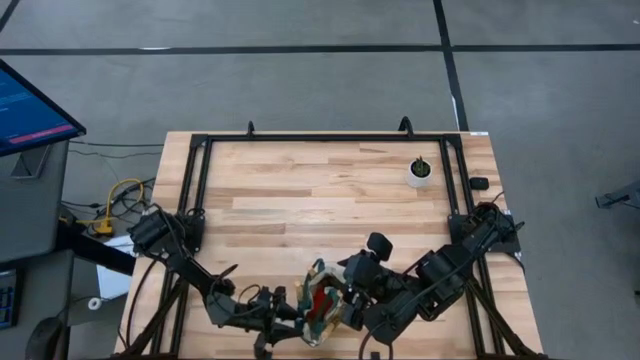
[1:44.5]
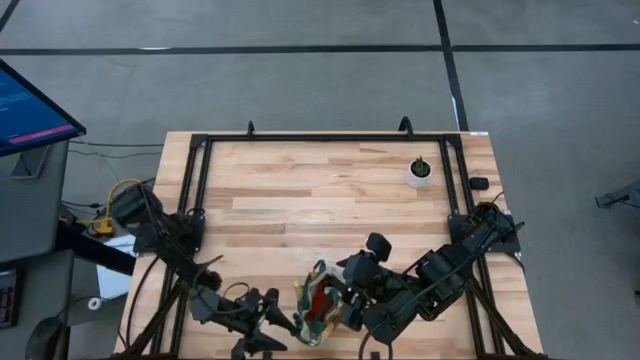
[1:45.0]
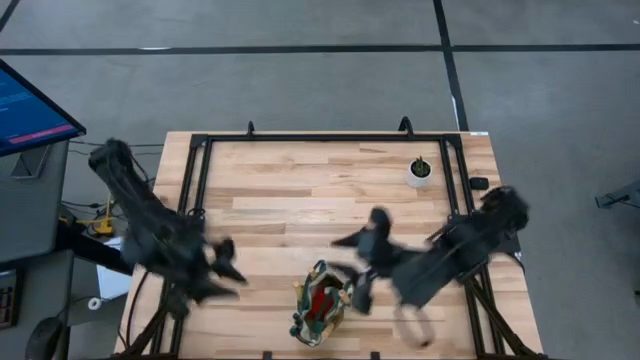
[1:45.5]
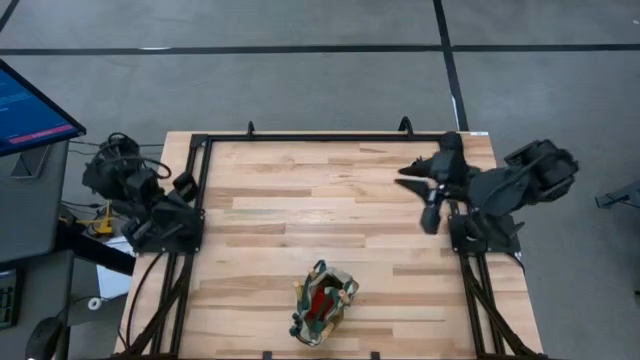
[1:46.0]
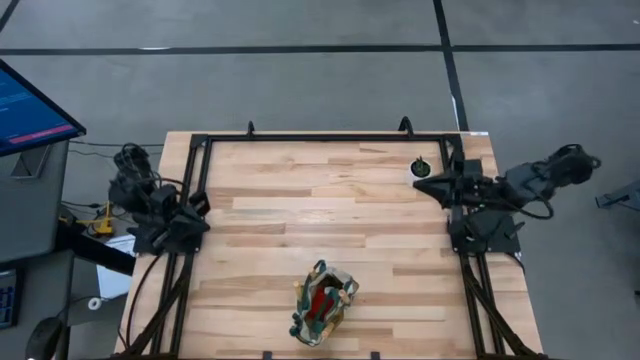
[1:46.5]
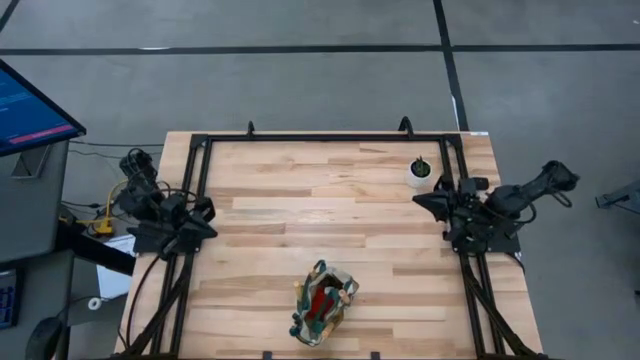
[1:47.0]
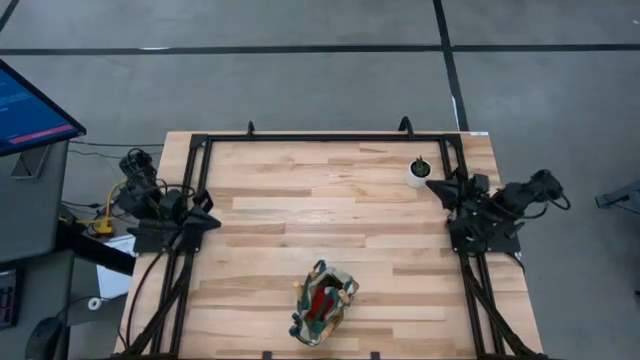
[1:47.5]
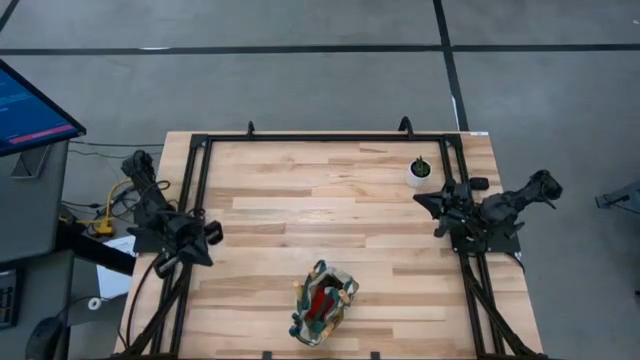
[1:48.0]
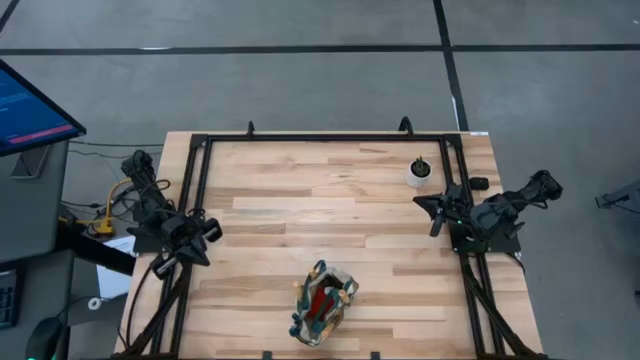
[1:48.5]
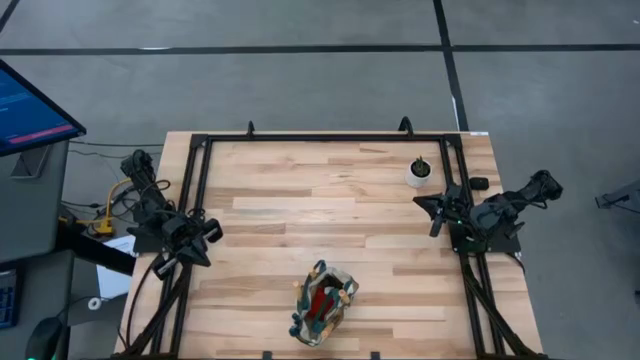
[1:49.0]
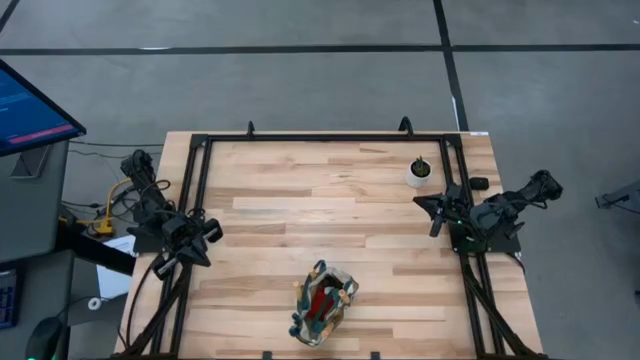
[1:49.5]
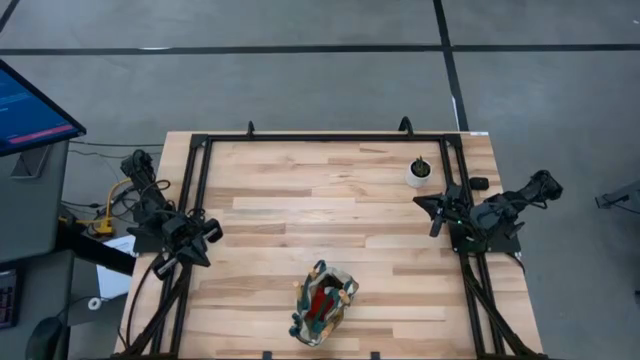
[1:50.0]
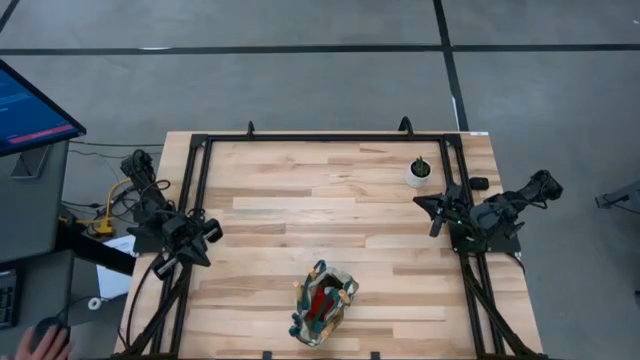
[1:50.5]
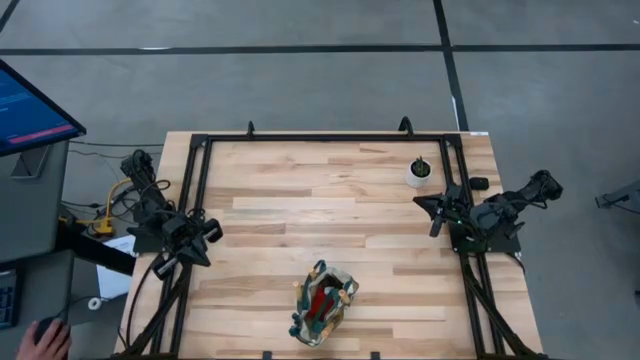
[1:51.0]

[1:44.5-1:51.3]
Task: Pick & Place Garden tools in Gardening bag
Return to Home Position

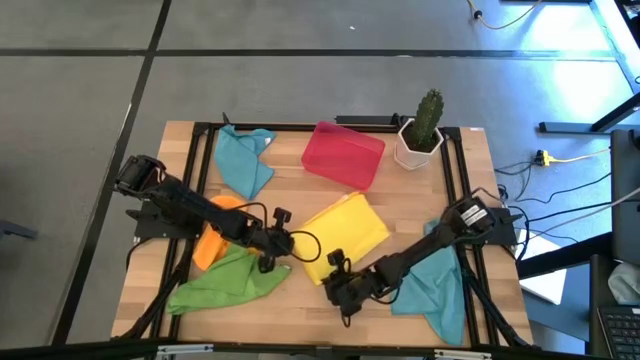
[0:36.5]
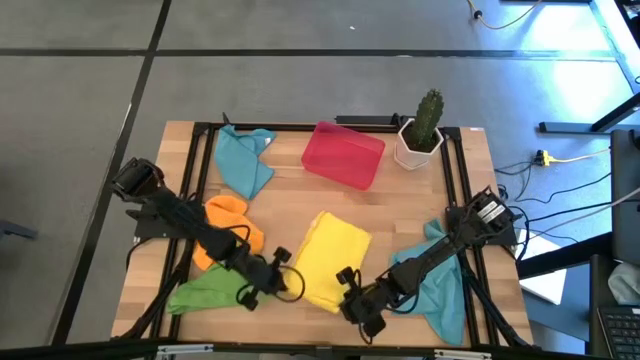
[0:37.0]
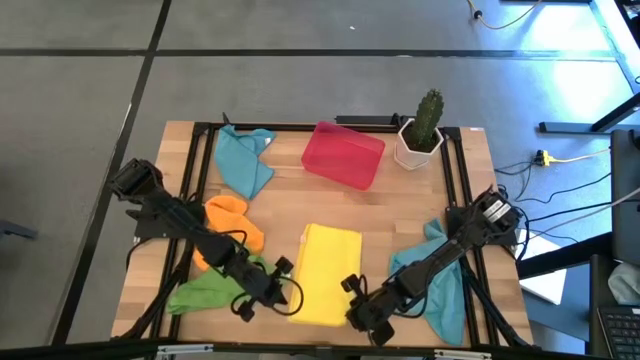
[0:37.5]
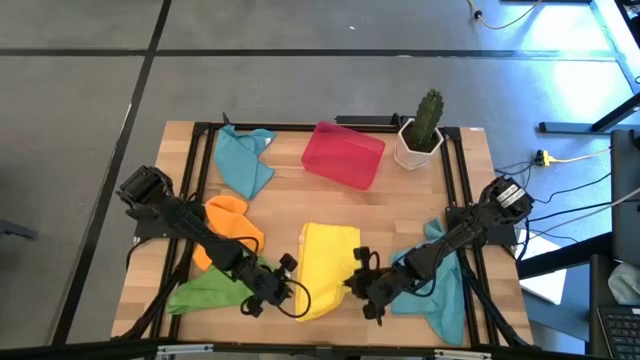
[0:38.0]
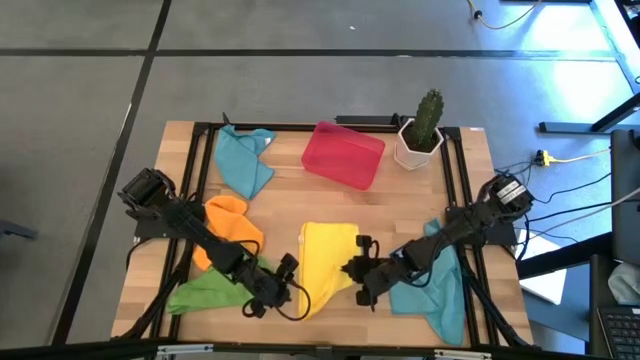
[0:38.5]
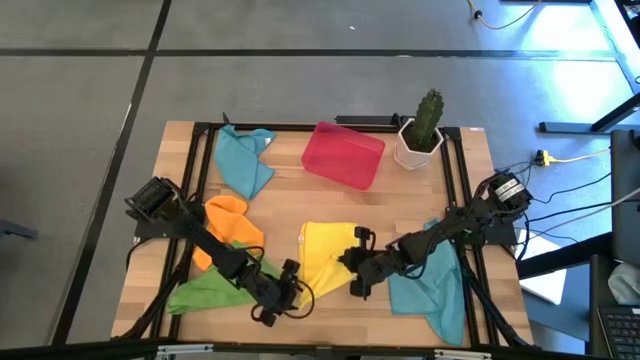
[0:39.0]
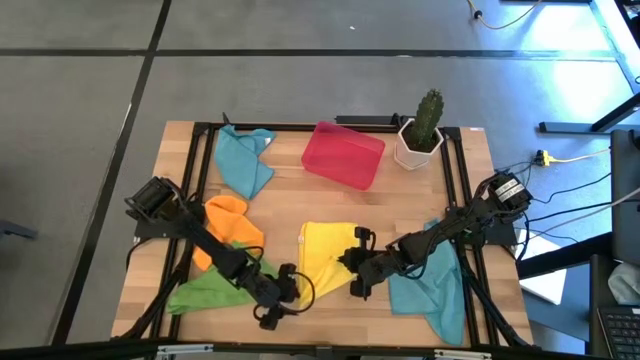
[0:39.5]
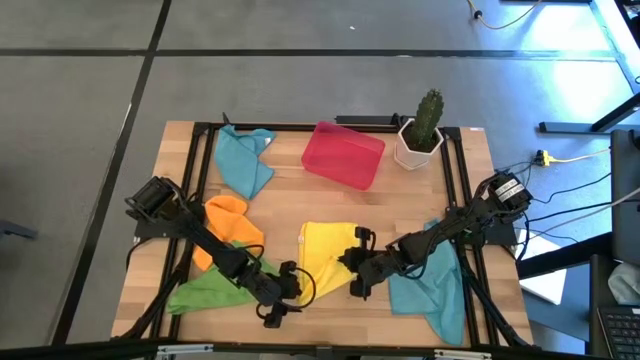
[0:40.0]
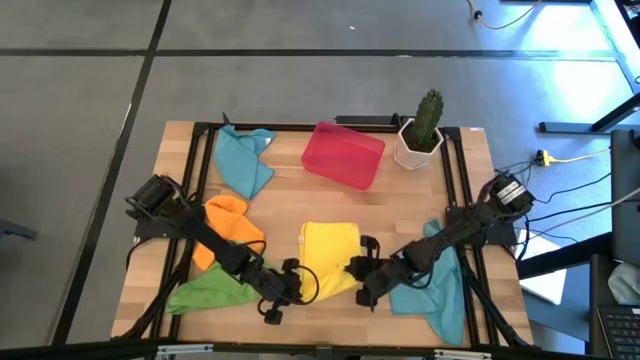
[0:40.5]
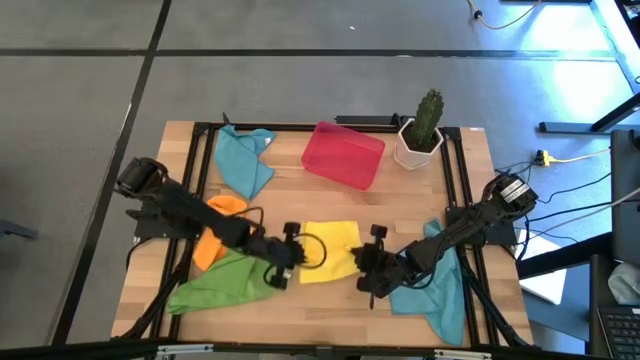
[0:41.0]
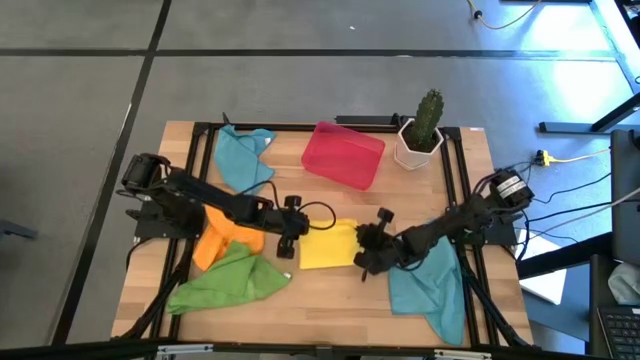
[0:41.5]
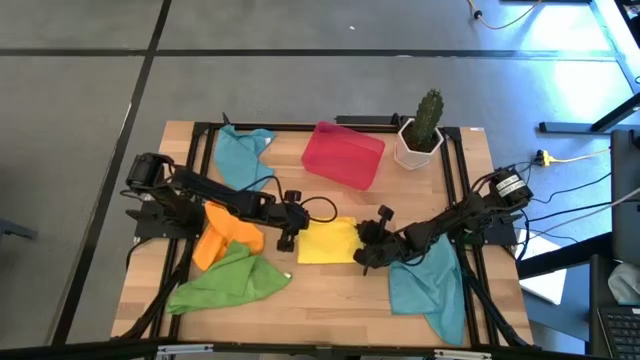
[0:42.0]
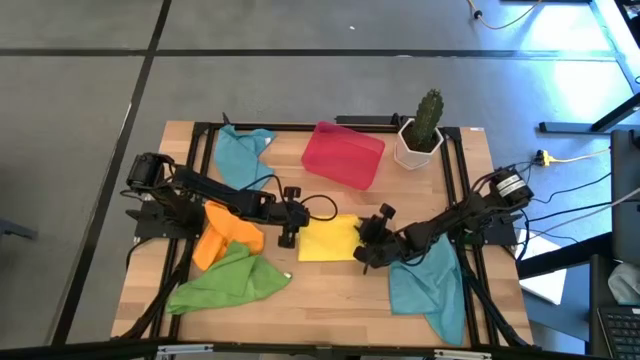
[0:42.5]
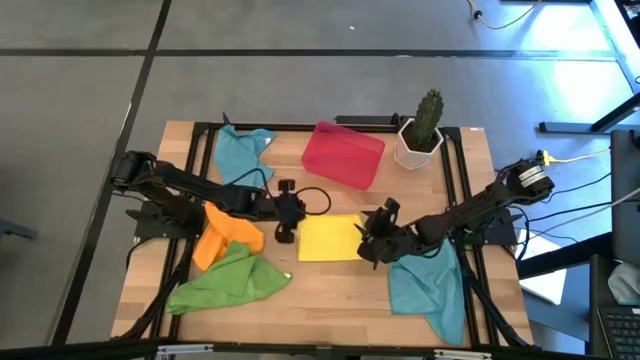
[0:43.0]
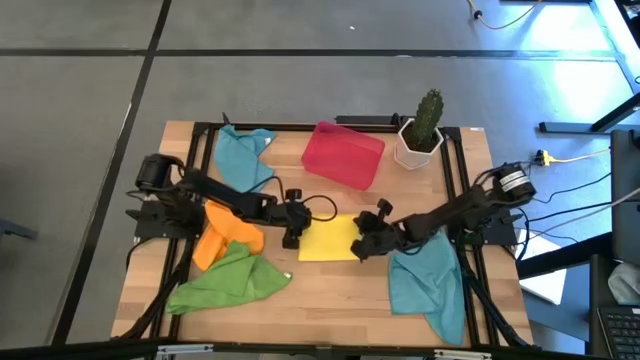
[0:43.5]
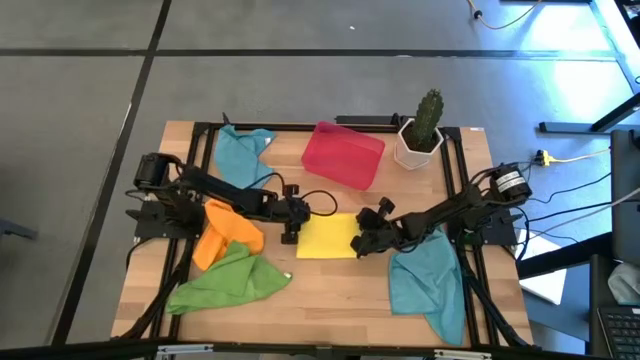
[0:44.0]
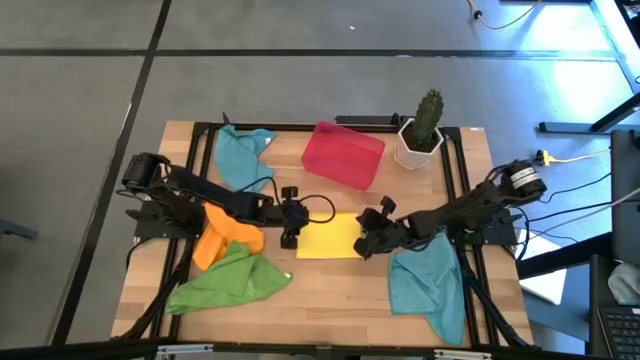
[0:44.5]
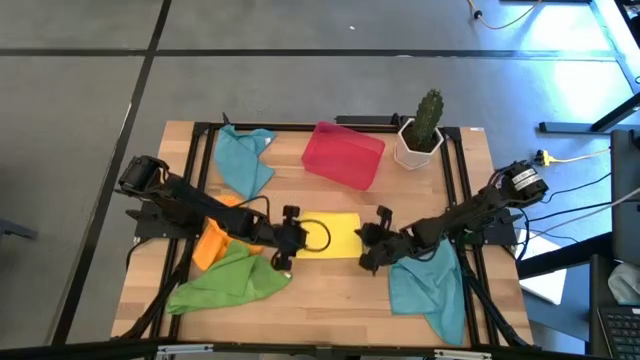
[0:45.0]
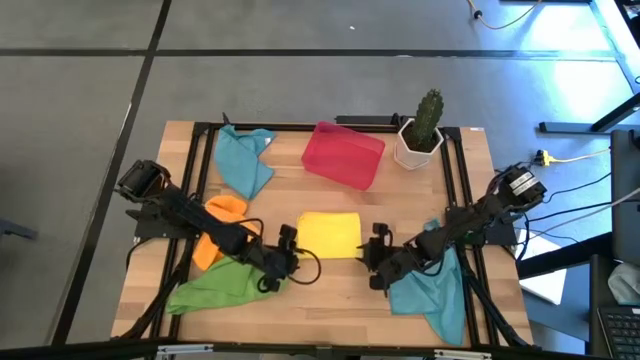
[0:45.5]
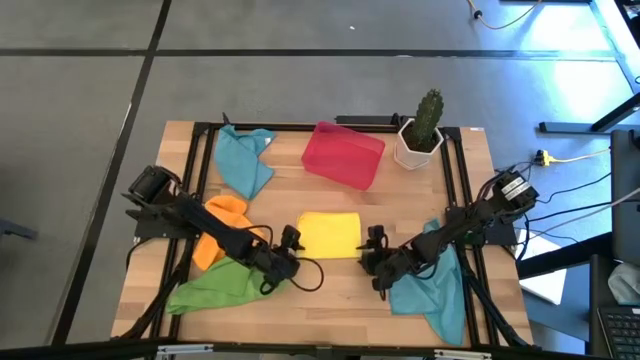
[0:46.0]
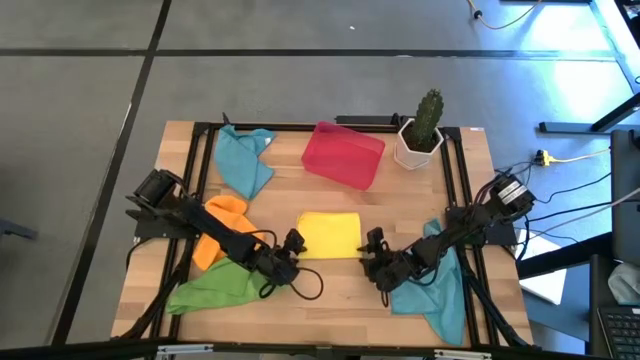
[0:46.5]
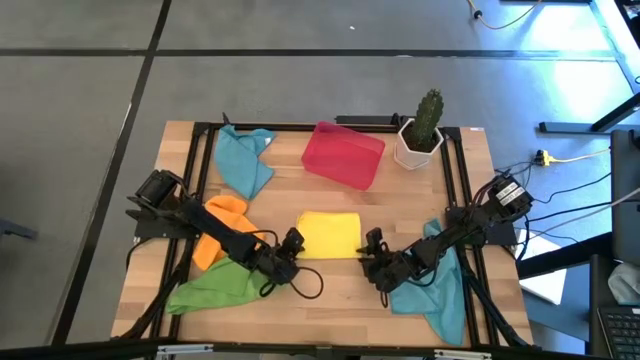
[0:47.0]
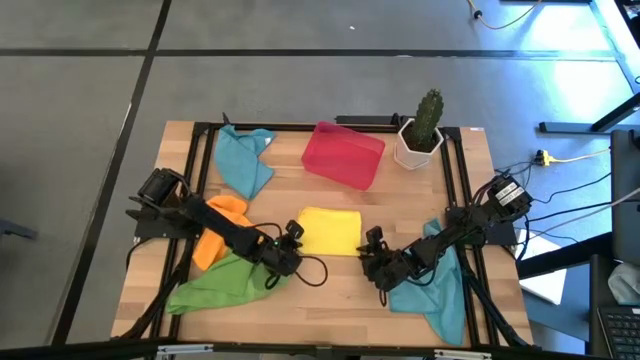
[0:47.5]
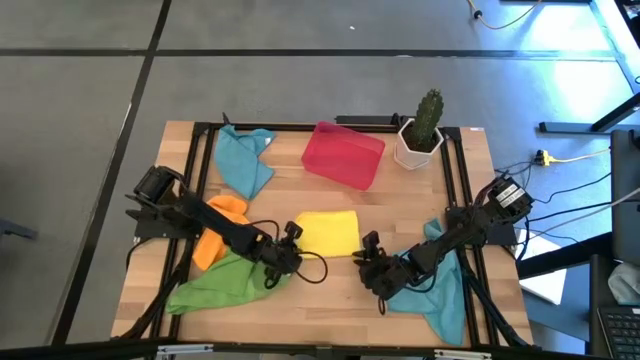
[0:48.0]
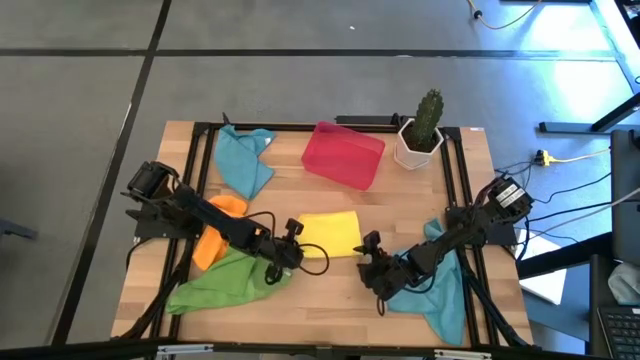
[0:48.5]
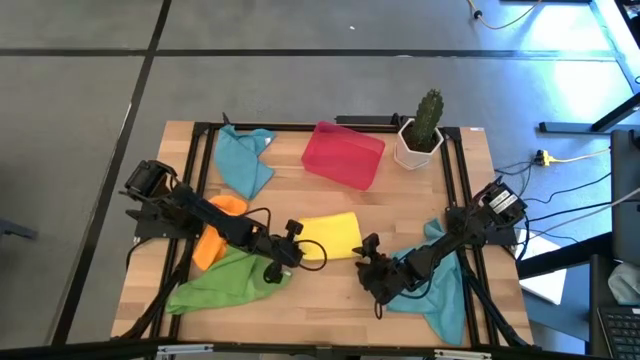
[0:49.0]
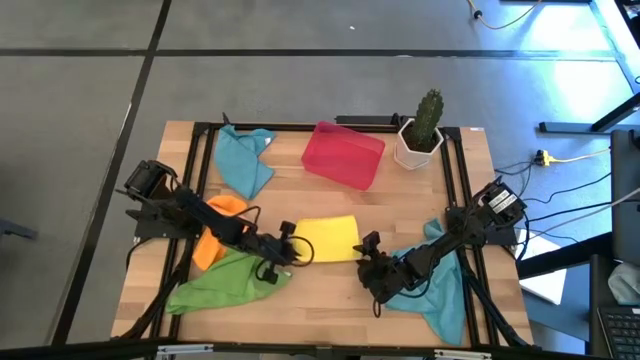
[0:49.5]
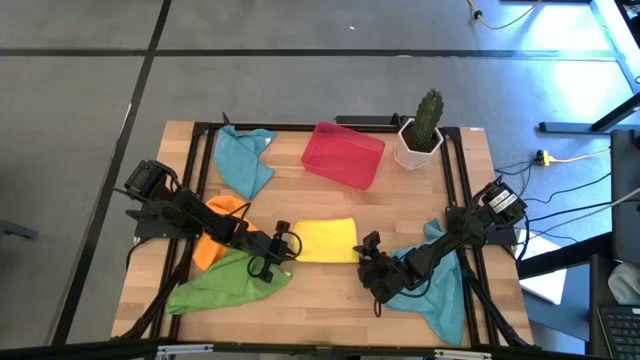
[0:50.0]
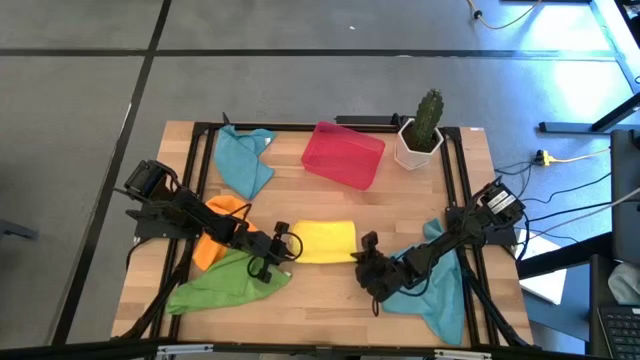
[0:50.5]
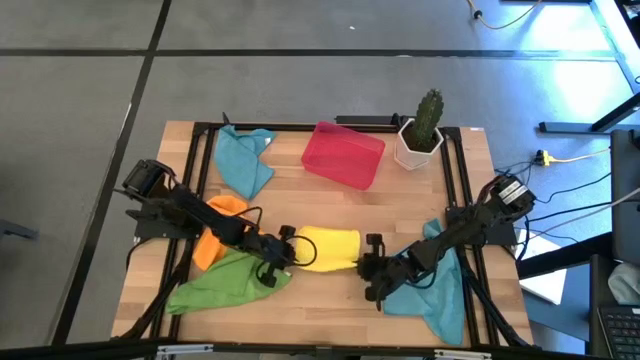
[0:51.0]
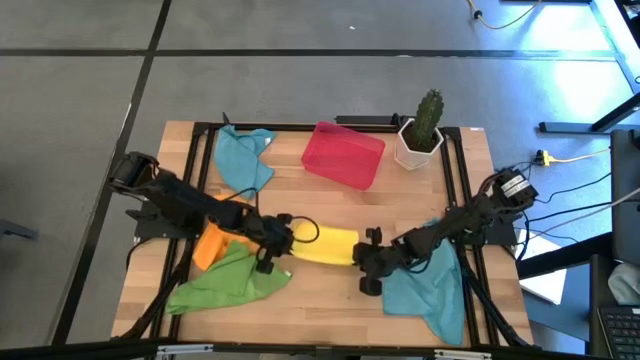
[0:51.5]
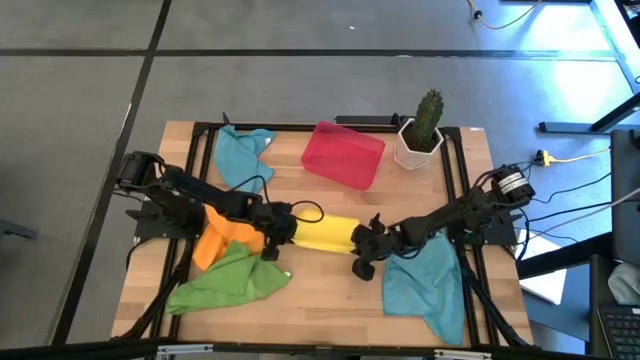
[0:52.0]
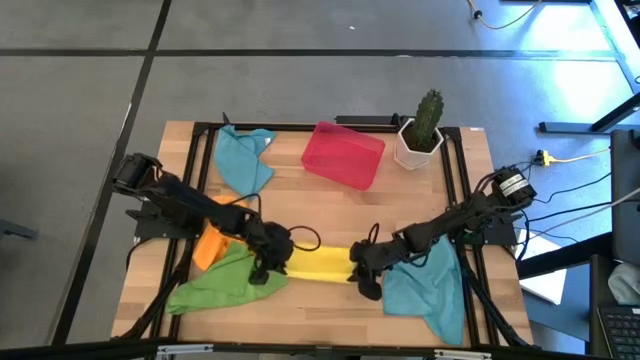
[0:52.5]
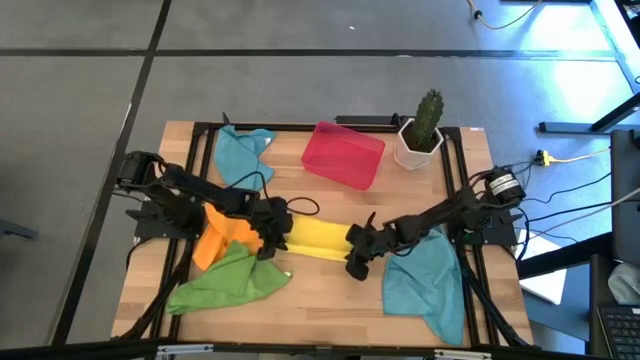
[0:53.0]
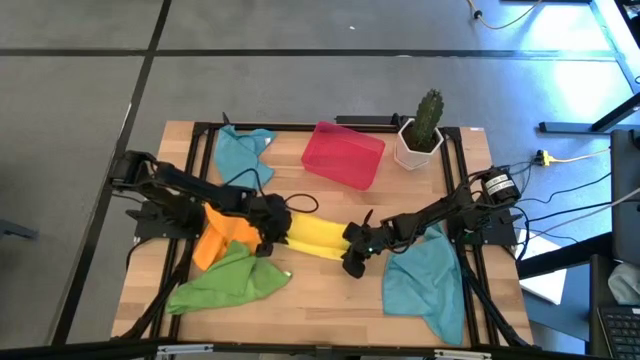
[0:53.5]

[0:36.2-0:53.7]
Task: Roll microfiber towels into tight, uniform cylinder then place into a basket
Roll the yellow towel
